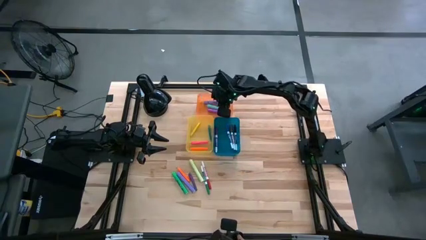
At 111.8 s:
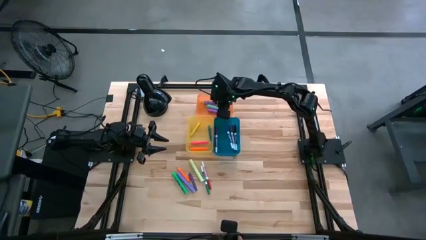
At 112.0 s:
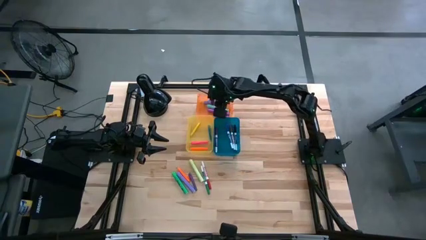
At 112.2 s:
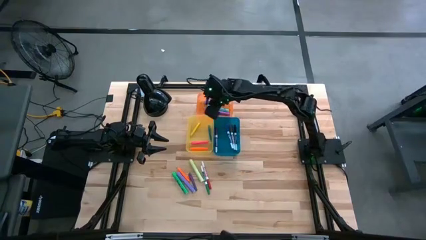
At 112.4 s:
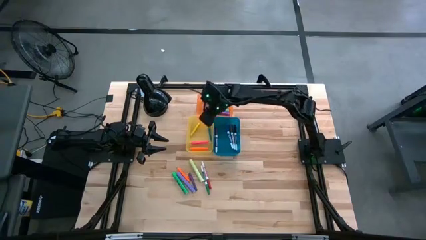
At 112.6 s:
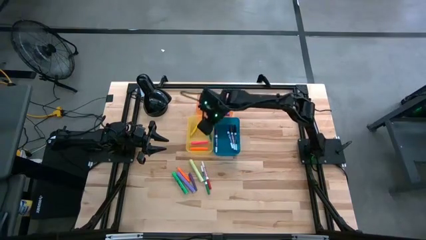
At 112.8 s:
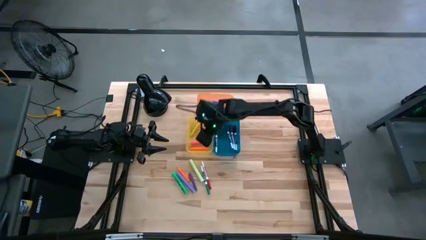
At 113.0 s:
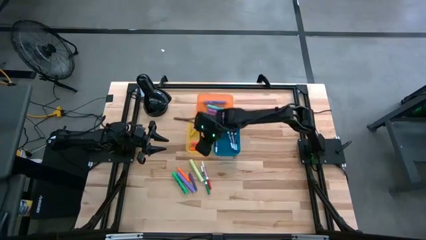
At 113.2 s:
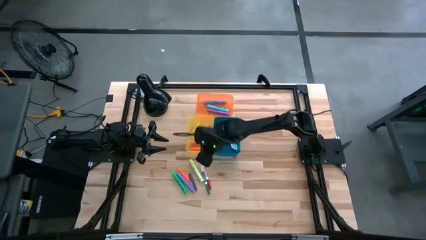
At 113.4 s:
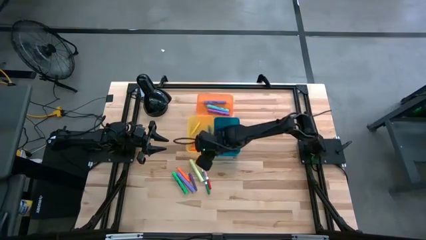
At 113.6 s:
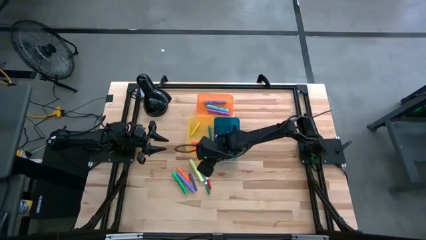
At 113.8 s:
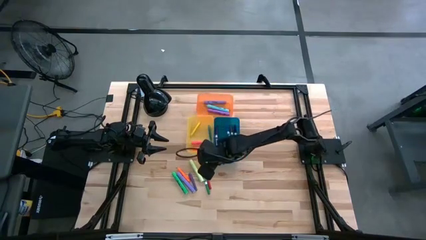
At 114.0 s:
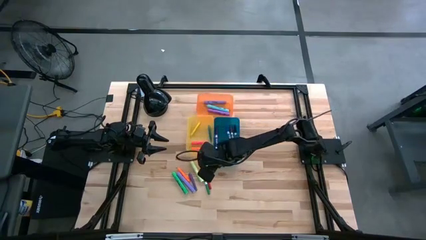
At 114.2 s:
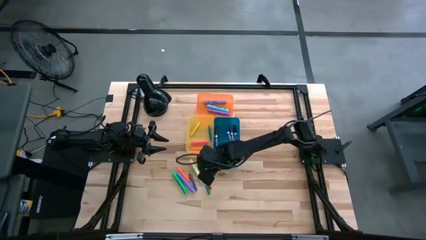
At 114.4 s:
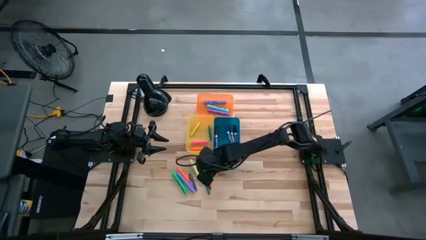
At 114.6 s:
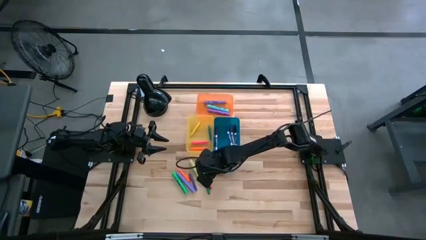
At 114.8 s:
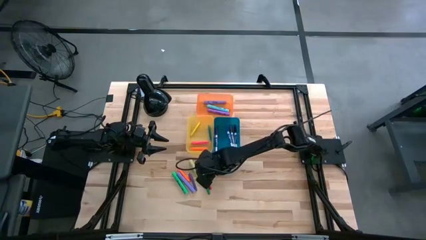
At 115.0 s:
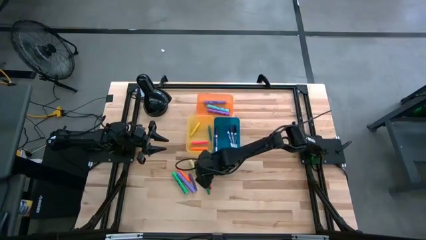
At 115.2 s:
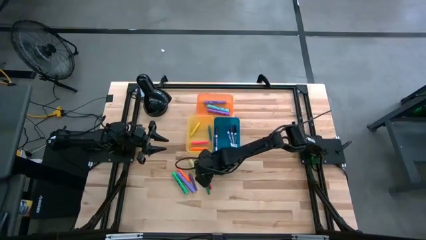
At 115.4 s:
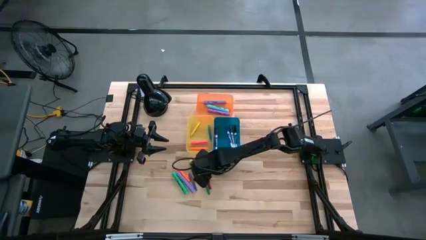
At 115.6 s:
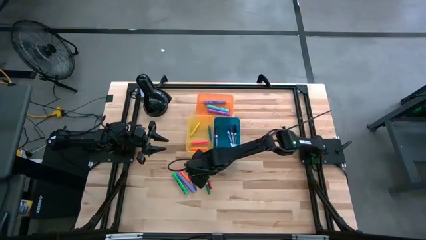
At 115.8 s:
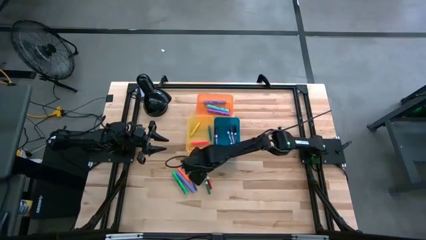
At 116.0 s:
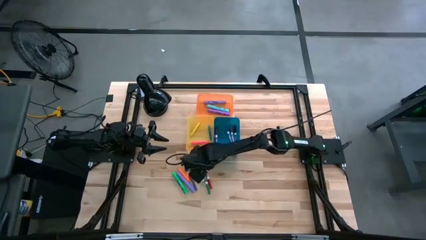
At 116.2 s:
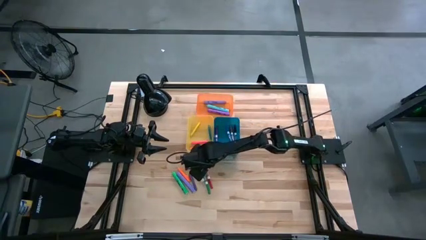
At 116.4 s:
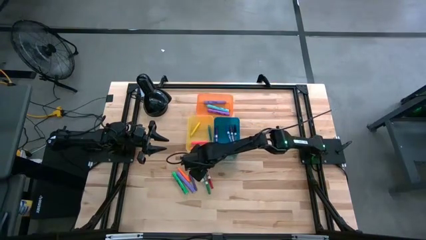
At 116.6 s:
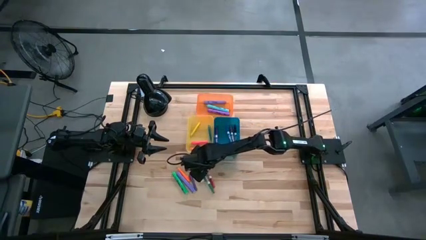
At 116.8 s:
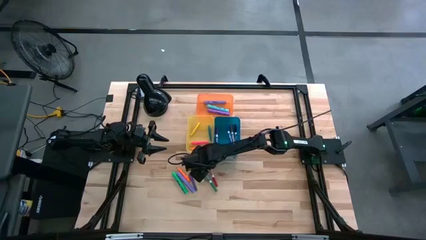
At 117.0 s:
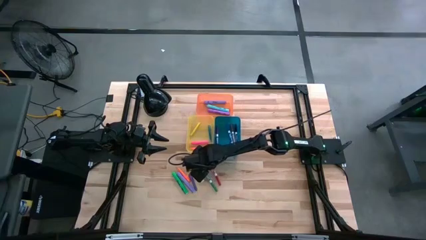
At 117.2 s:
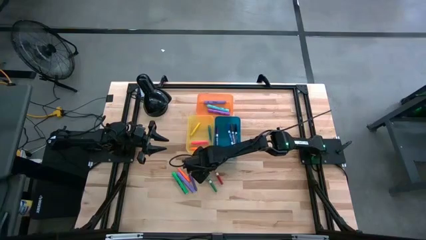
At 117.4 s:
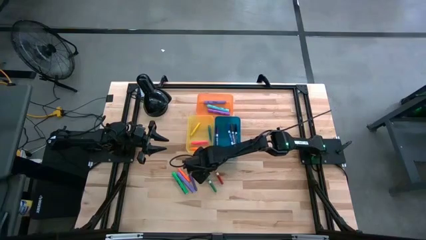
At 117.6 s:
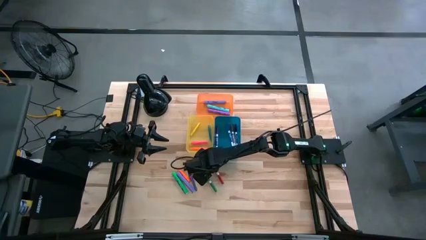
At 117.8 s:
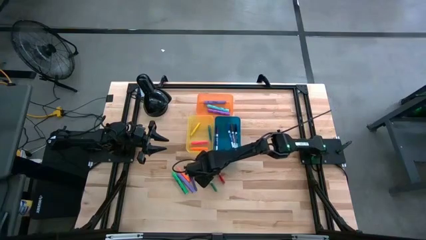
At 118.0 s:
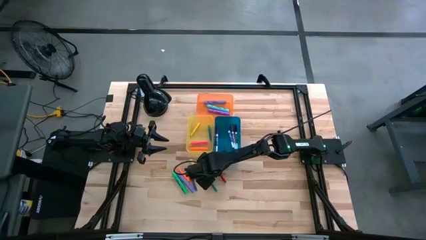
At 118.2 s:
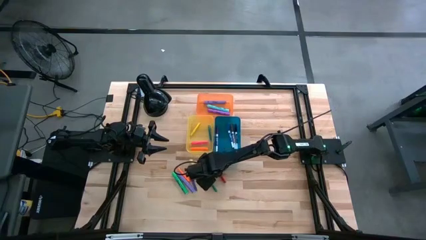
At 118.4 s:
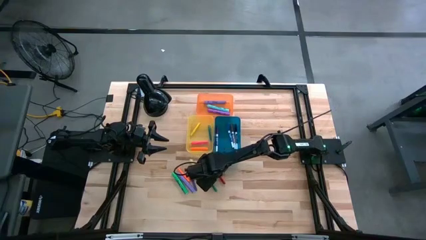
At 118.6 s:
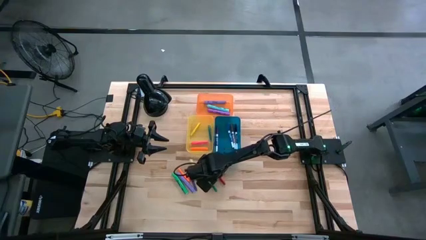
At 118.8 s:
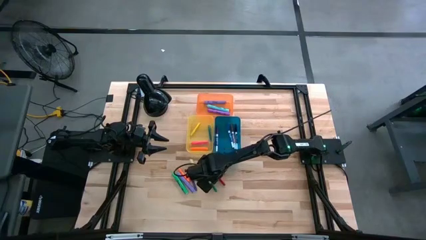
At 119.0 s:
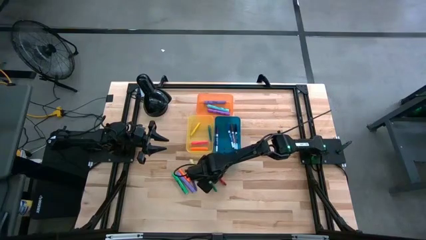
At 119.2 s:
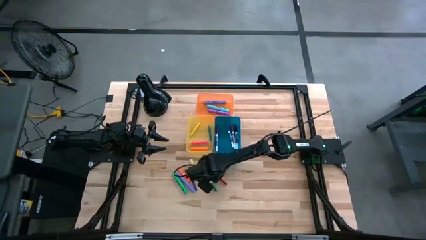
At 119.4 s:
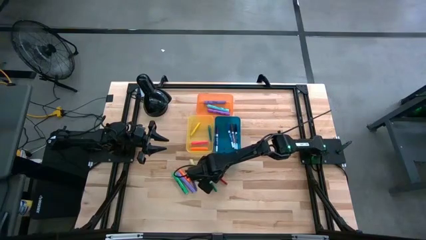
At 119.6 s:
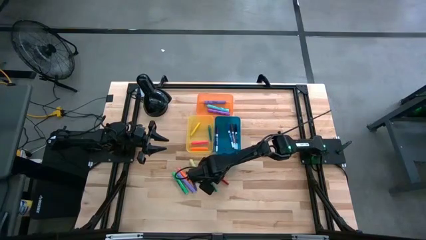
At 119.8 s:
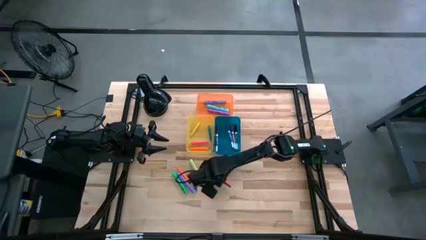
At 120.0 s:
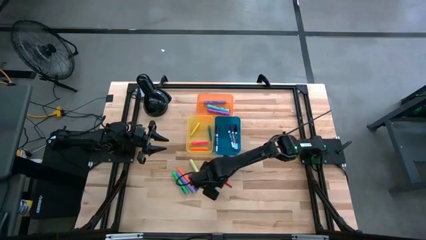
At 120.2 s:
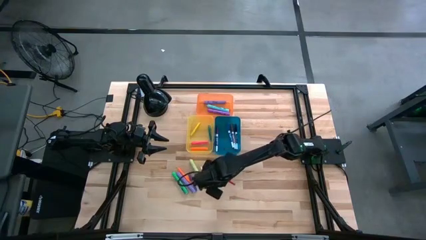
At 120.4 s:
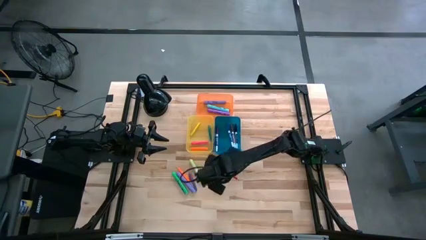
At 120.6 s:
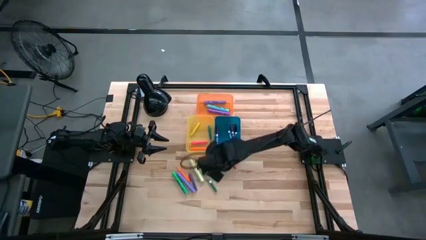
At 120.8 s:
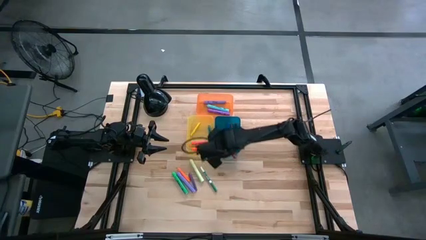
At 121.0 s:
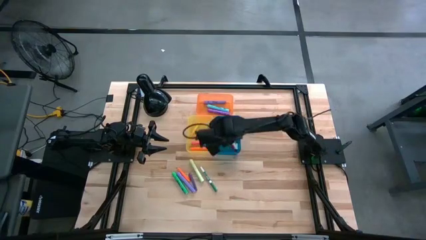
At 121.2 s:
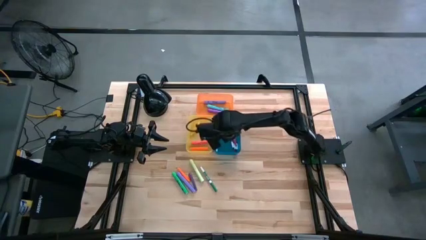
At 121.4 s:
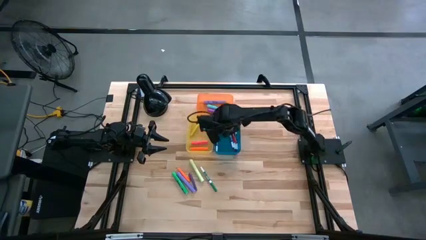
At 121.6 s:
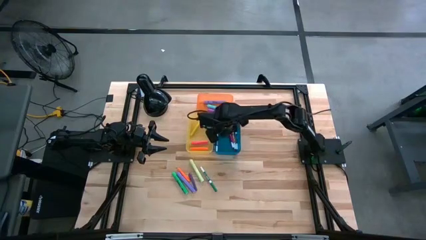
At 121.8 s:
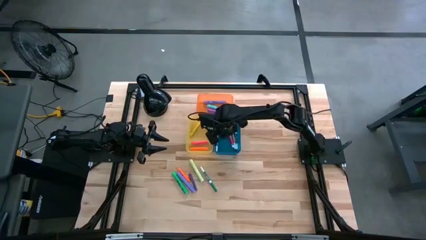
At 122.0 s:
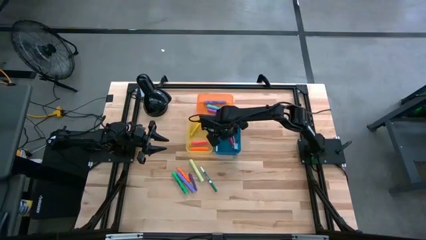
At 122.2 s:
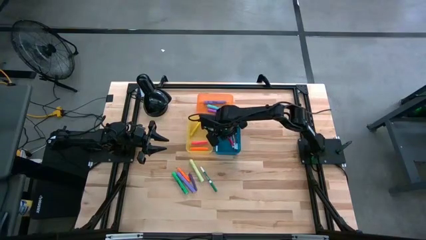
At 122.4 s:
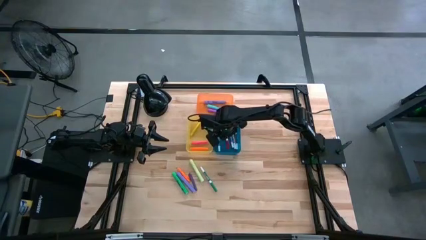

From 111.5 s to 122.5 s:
Task: Pick & Place Markers
Put the red marker pen into the blue bin

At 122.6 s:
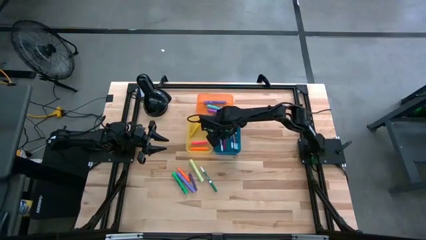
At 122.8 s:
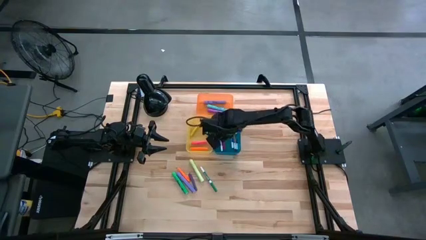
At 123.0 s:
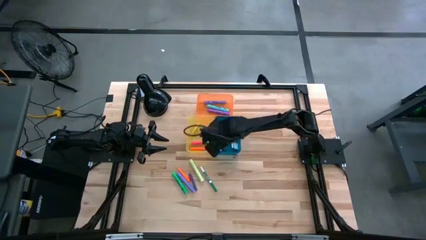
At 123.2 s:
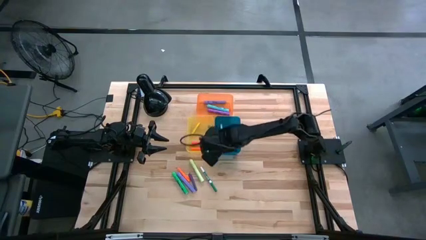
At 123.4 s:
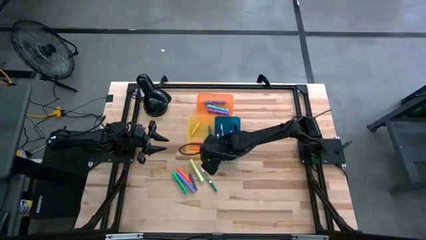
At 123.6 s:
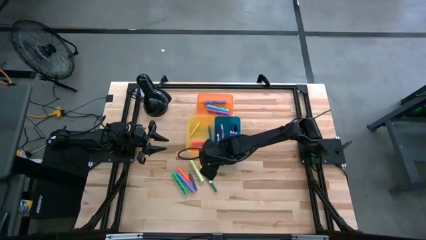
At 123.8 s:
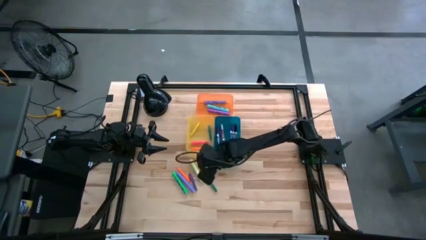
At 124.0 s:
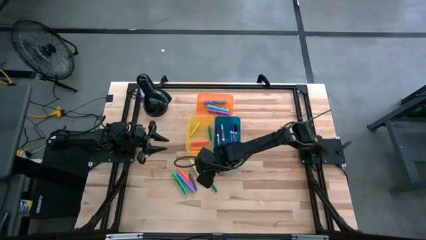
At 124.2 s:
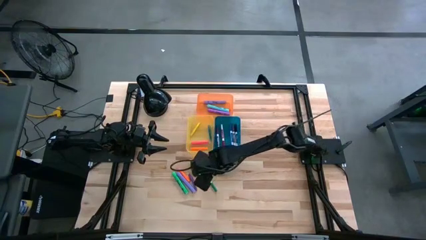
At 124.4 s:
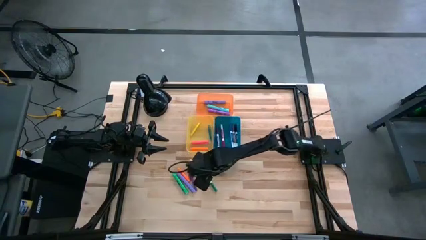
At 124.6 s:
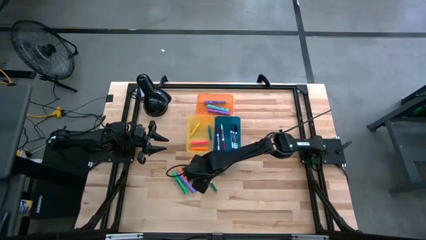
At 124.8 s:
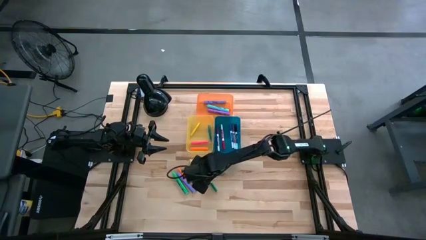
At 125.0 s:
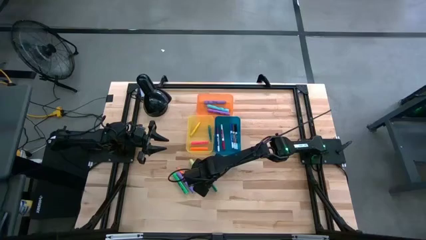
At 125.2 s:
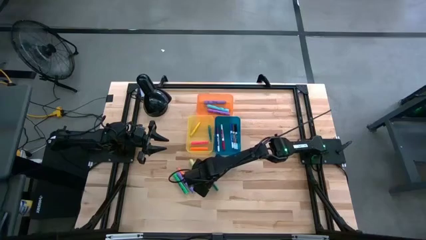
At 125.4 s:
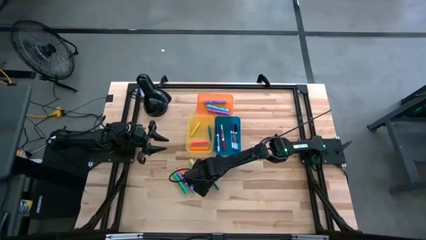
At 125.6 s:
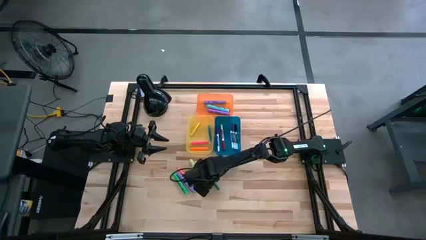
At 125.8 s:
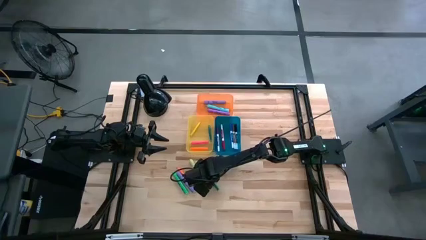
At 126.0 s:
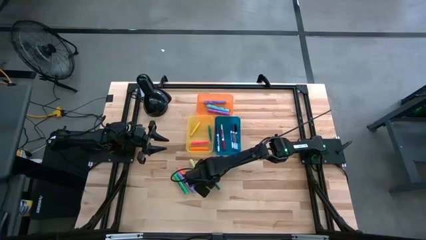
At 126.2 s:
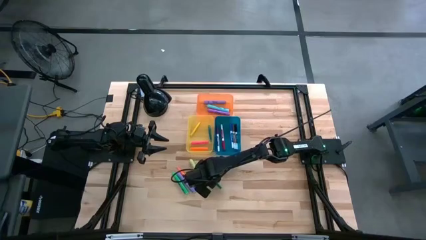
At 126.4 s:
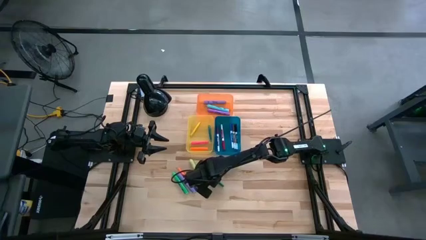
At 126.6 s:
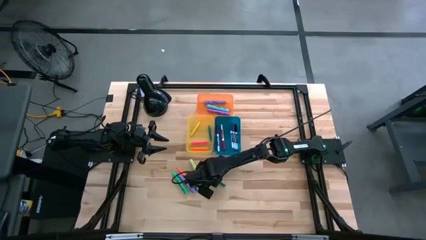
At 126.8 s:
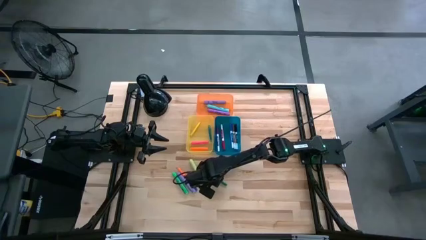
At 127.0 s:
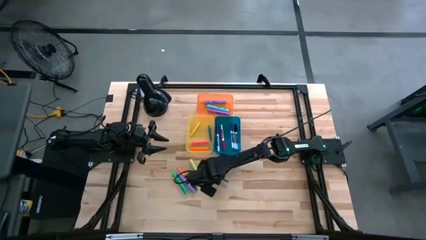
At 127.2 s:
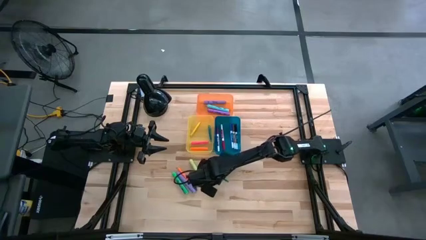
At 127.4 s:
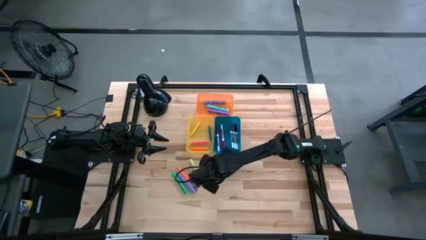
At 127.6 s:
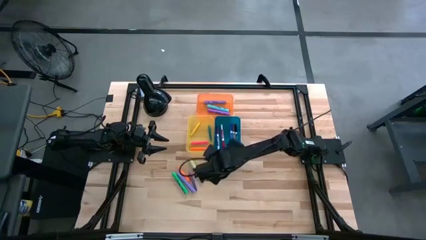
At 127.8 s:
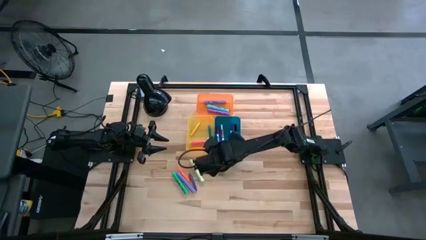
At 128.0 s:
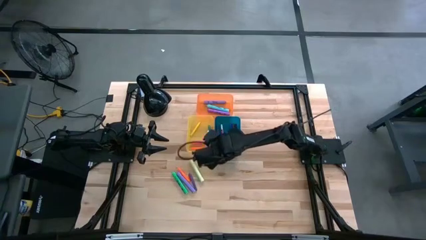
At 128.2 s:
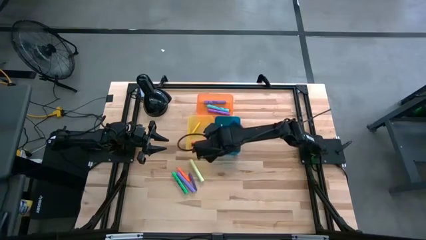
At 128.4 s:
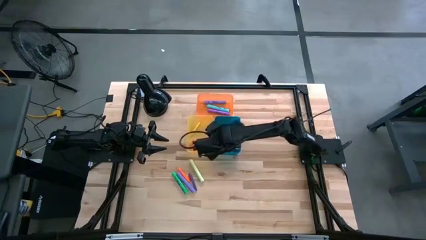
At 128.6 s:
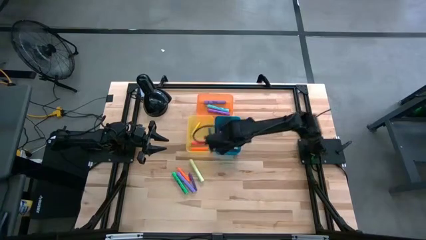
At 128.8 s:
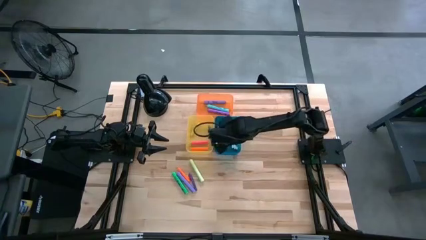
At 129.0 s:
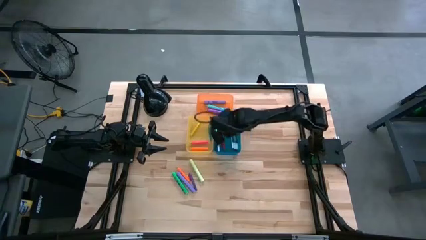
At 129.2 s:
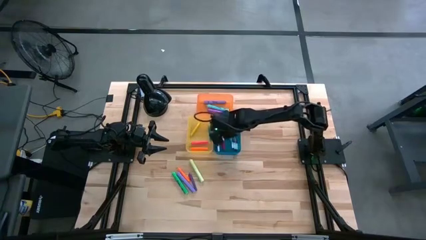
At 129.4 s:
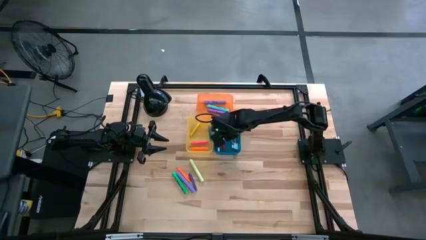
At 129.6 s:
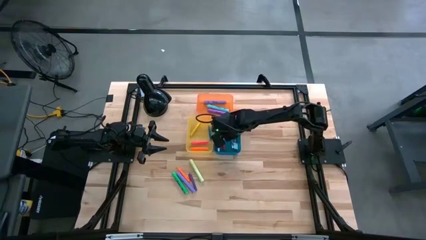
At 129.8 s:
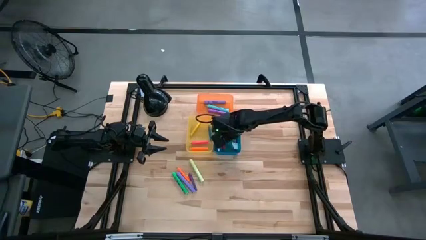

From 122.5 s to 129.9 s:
Put the green marker pen into the blue bin
